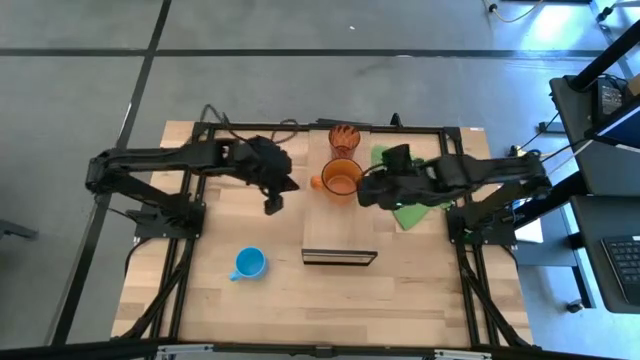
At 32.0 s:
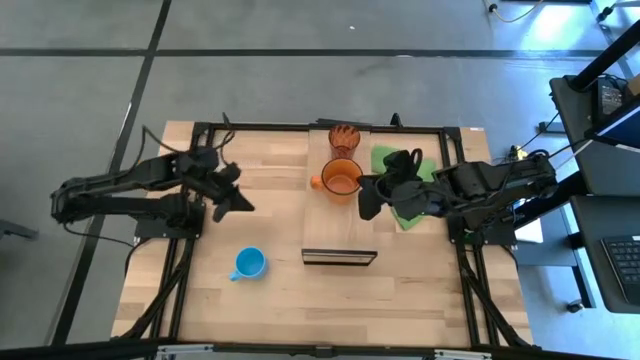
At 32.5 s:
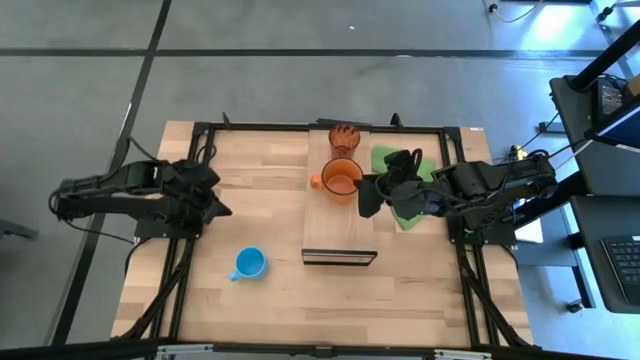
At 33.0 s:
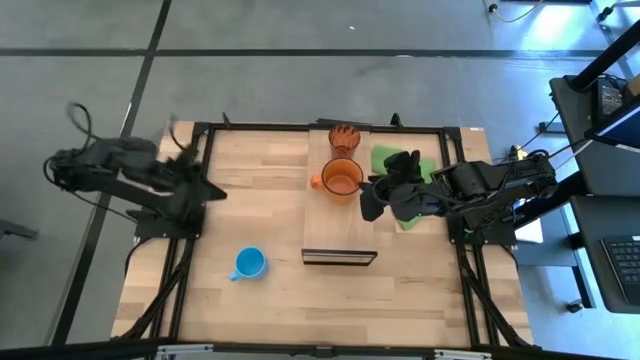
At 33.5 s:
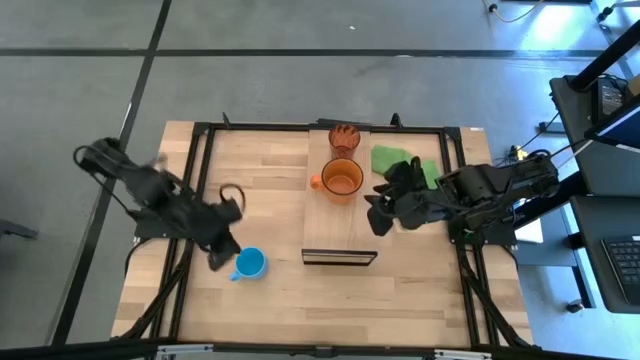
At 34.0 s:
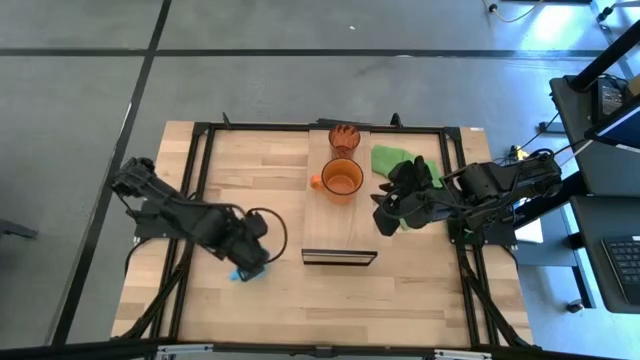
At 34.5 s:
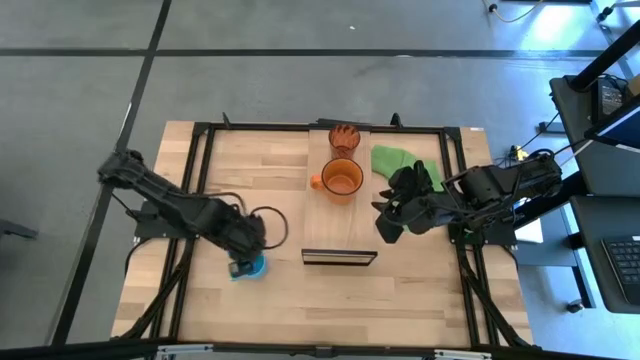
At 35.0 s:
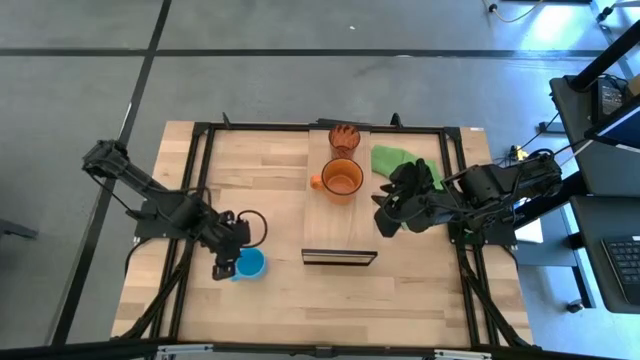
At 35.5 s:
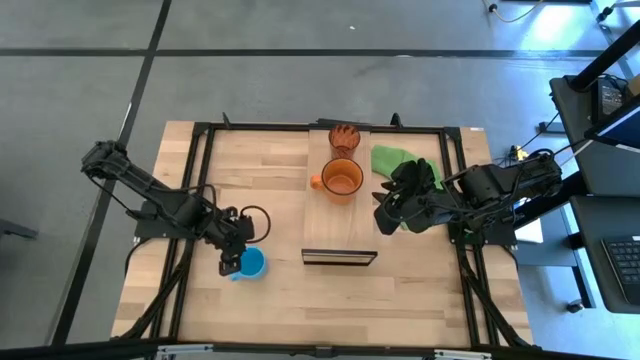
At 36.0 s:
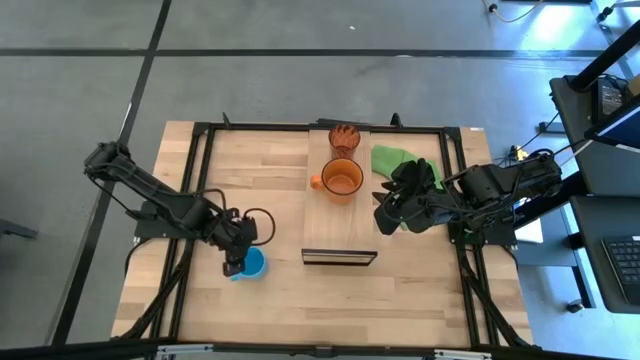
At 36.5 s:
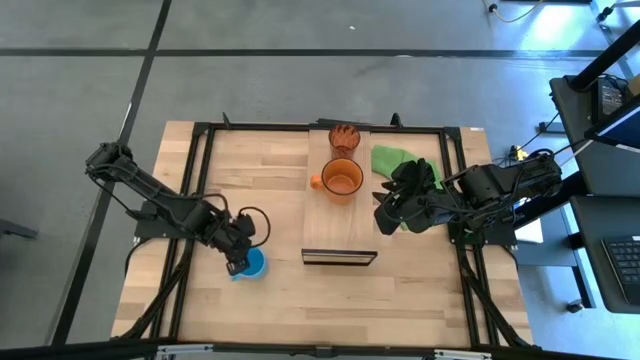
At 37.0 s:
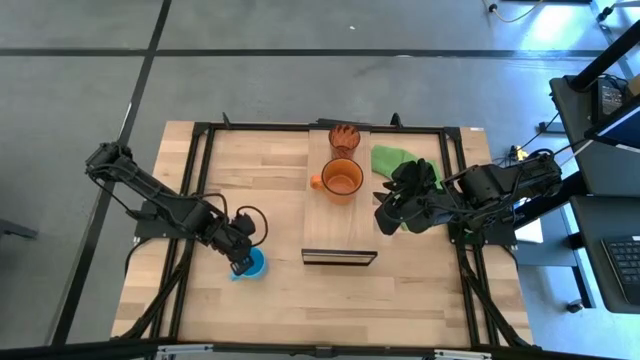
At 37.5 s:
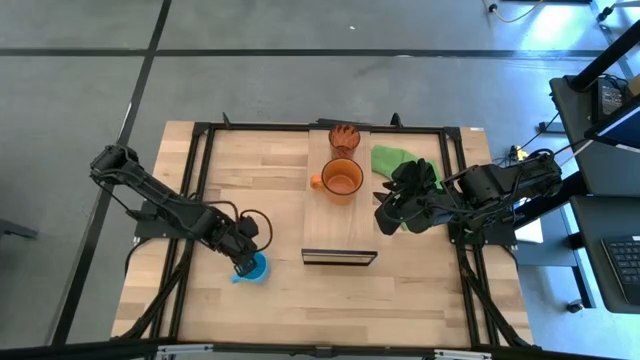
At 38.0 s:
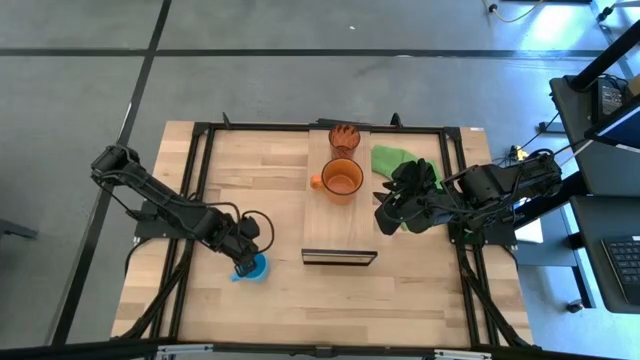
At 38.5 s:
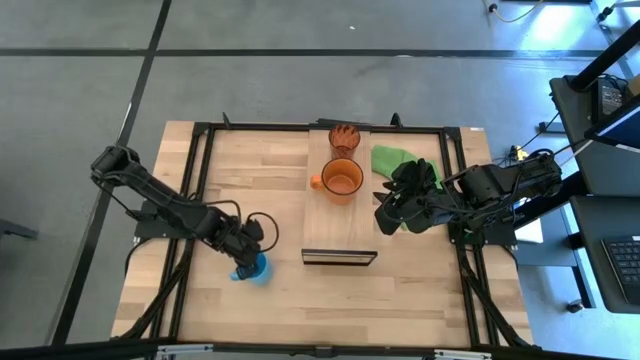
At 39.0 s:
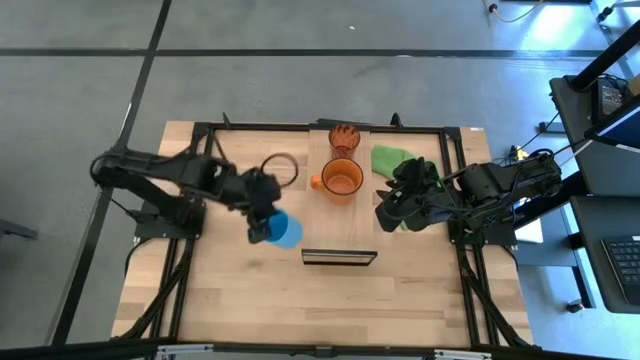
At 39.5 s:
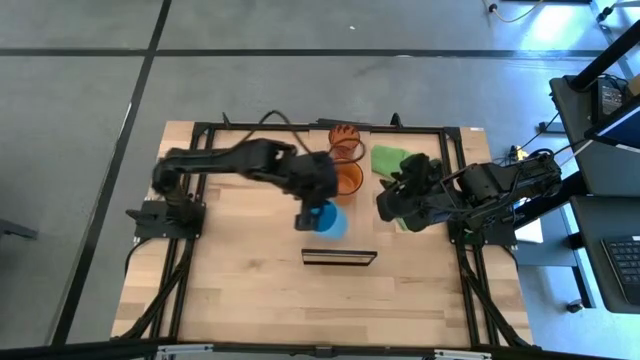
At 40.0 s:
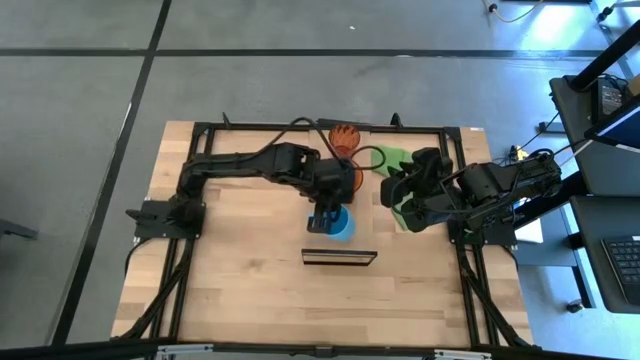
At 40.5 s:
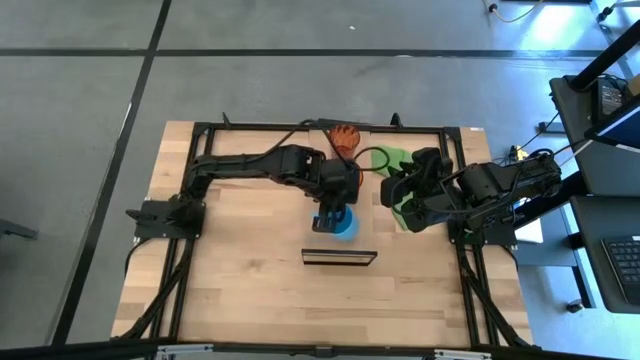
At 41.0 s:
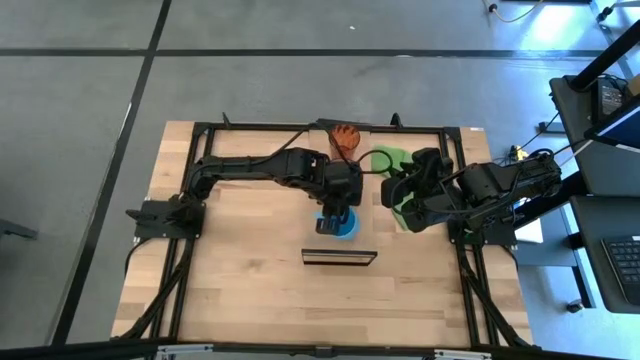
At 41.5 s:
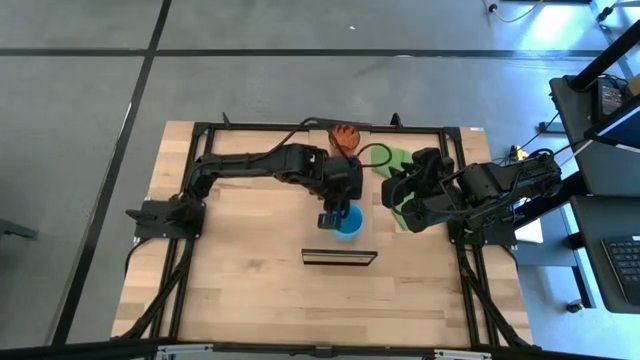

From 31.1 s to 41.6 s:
Task: Stack small to large cups/mugs on shelf
Put the blue mug on the shelf

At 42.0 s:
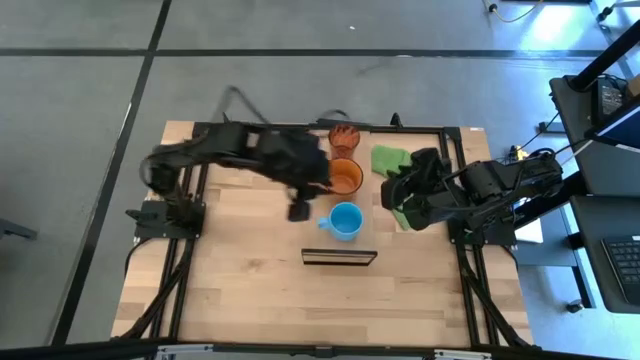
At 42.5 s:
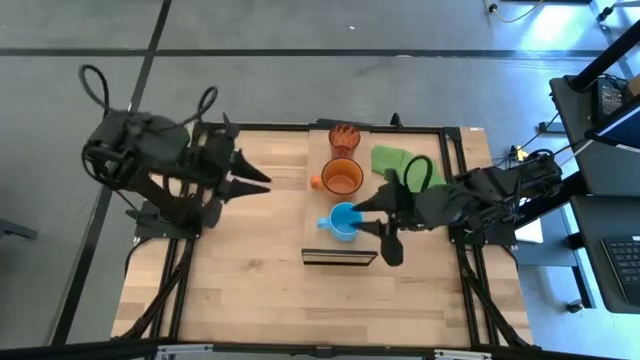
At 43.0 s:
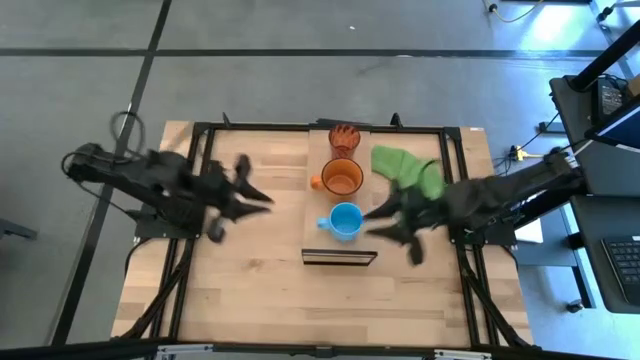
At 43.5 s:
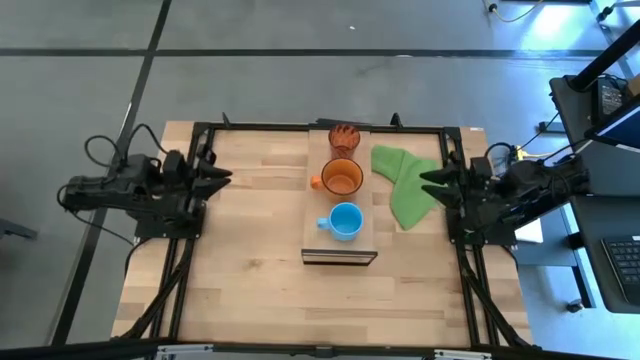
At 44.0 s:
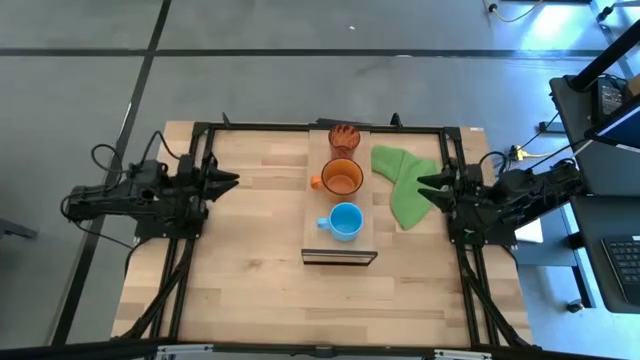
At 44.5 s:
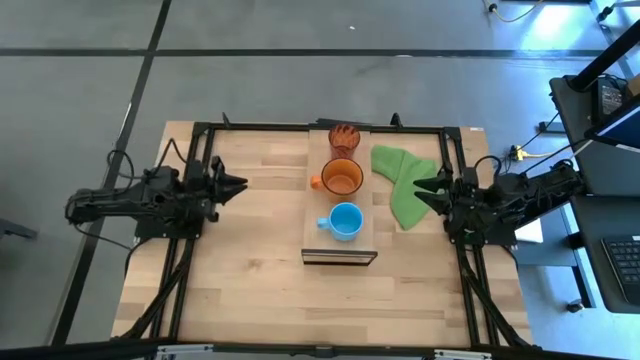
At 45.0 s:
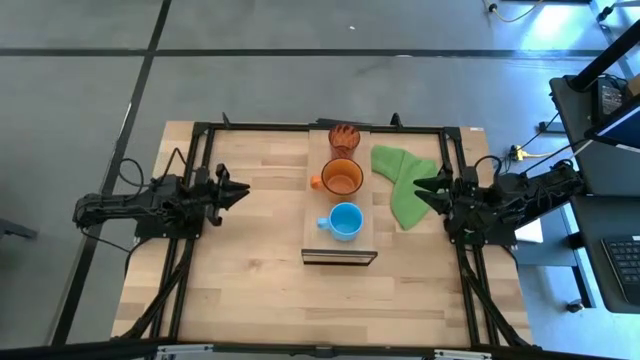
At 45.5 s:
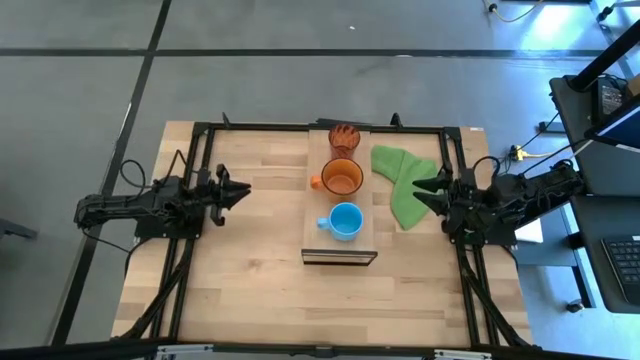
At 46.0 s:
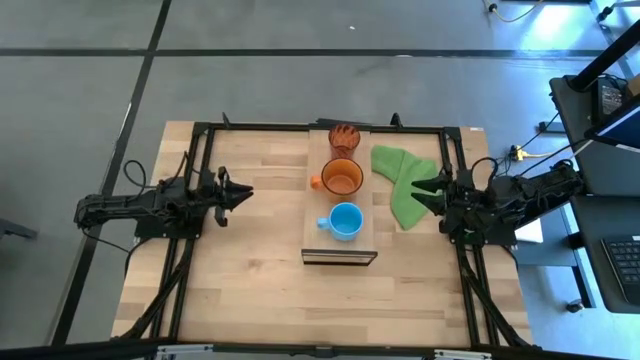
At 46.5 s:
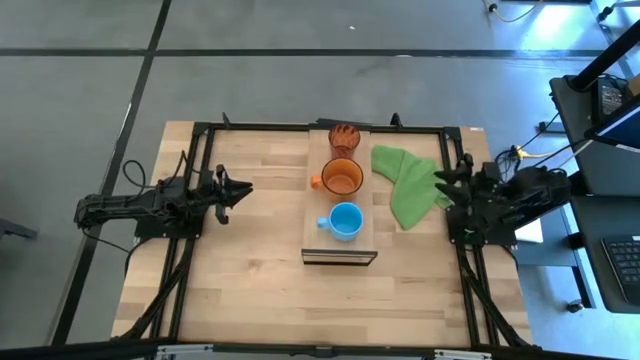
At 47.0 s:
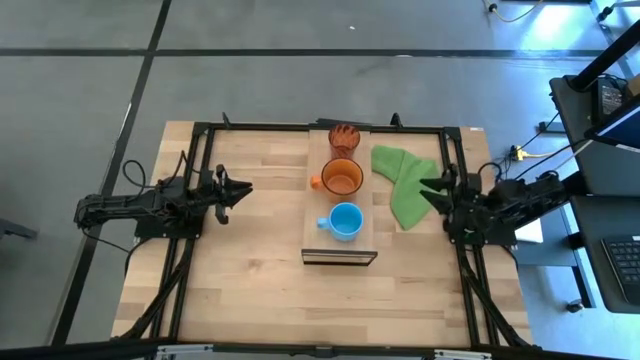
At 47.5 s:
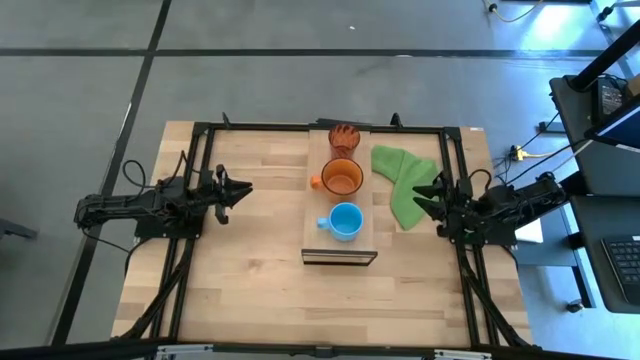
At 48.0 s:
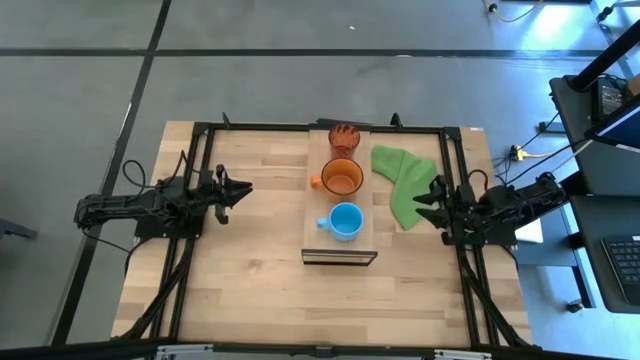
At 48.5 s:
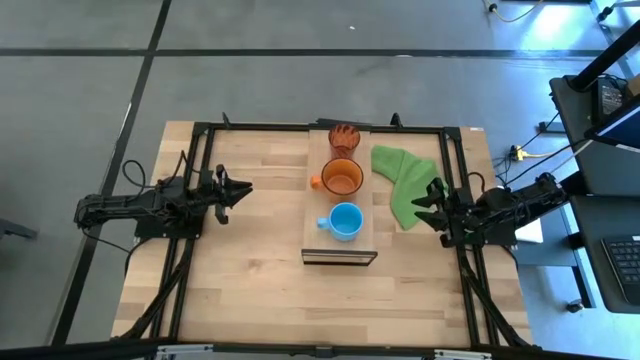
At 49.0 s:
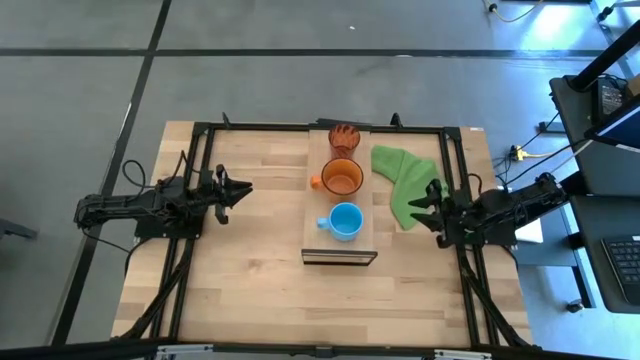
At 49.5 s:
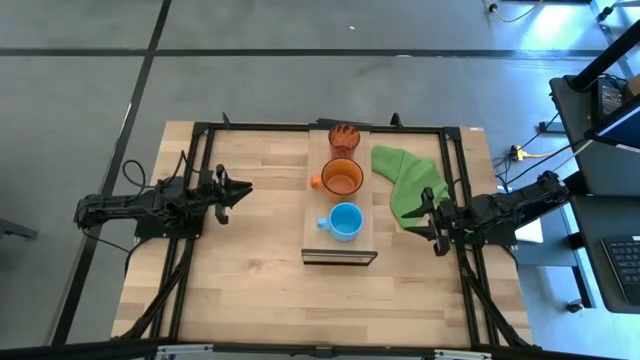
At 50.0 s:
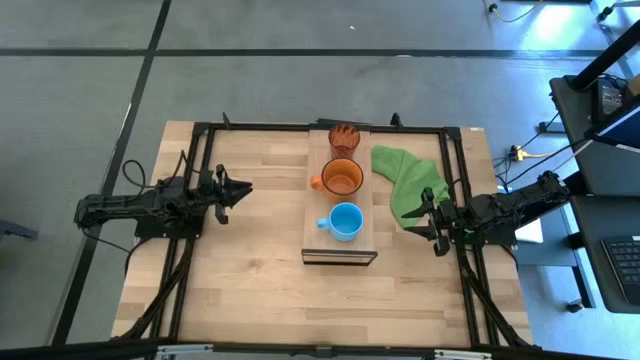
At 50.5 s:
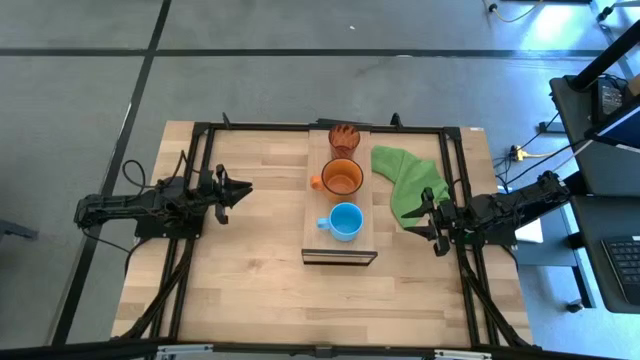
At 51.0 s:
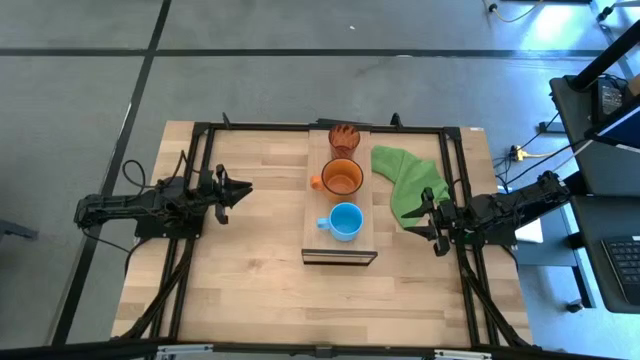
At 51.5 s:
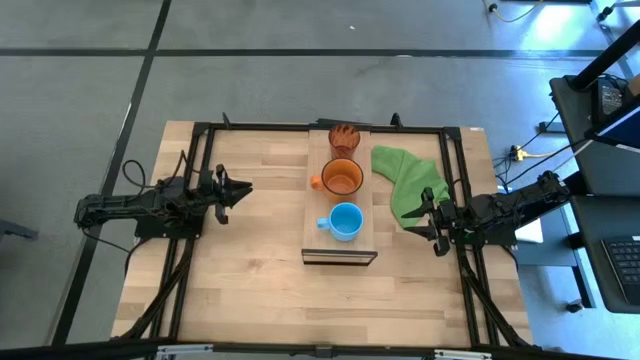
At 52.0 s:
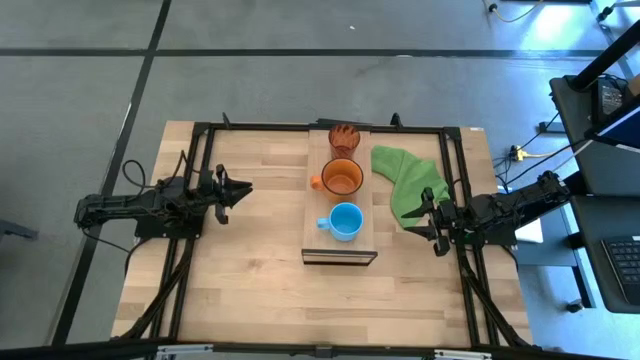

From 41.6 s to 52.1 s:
Return to Home Position
